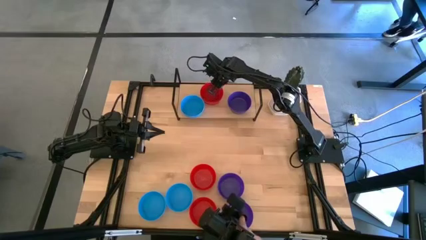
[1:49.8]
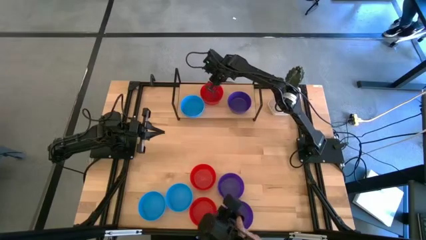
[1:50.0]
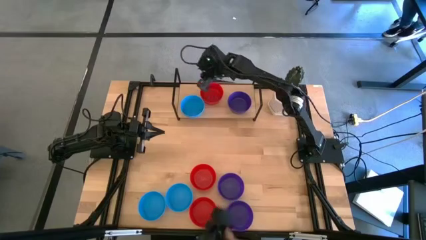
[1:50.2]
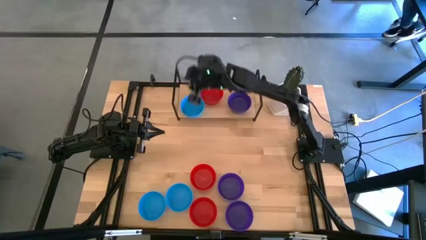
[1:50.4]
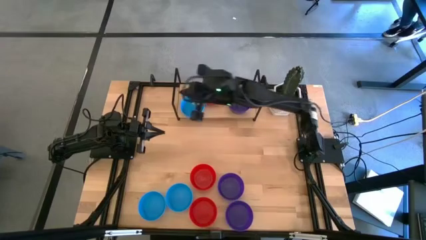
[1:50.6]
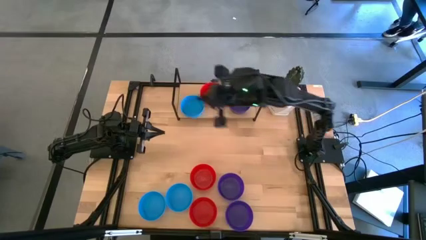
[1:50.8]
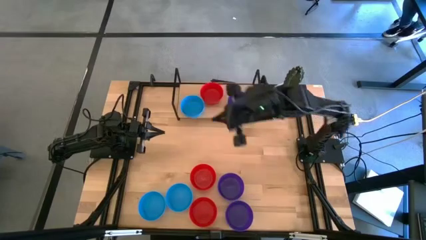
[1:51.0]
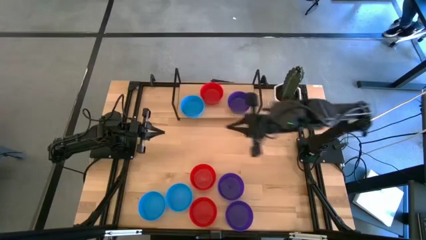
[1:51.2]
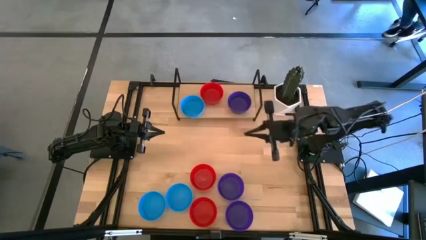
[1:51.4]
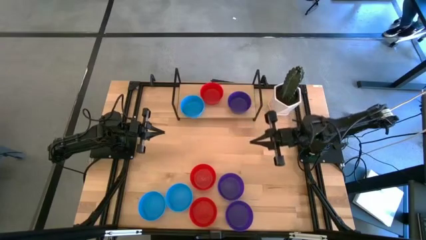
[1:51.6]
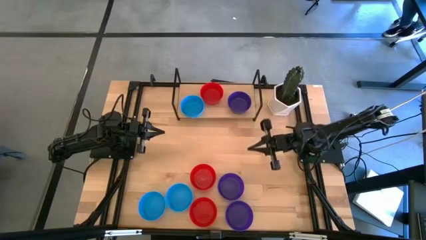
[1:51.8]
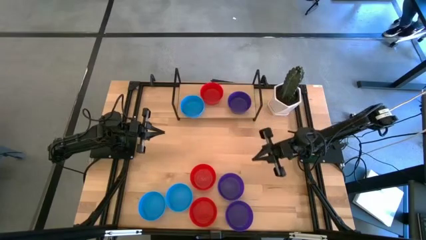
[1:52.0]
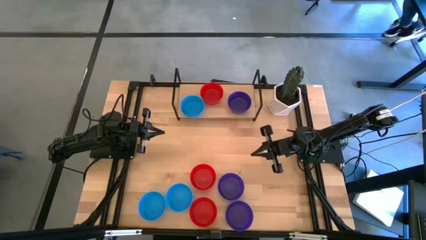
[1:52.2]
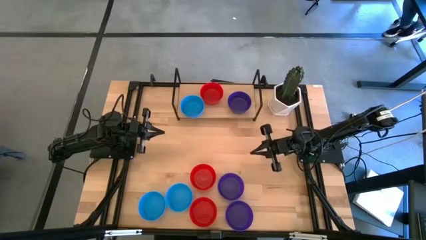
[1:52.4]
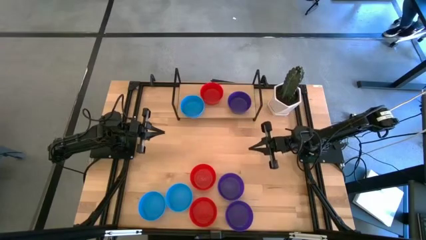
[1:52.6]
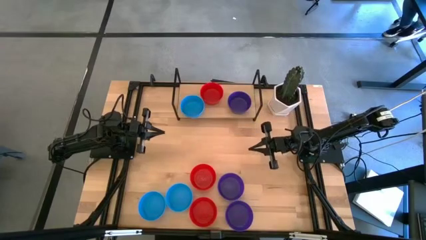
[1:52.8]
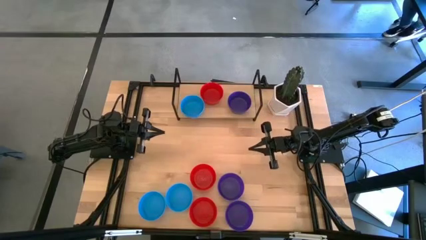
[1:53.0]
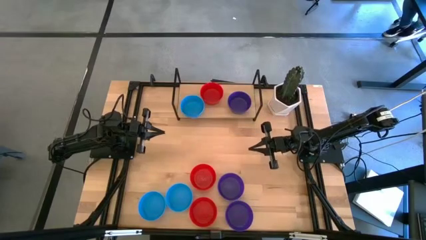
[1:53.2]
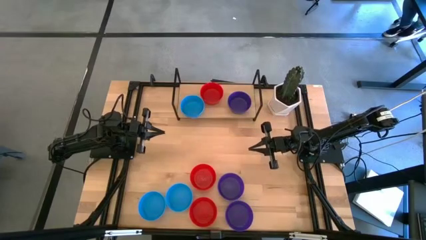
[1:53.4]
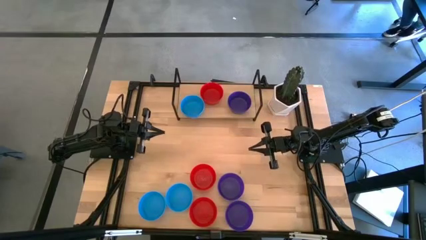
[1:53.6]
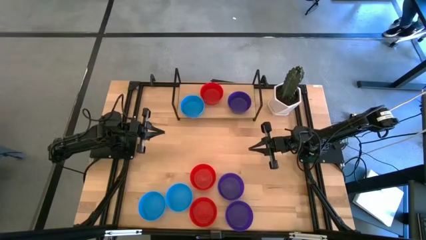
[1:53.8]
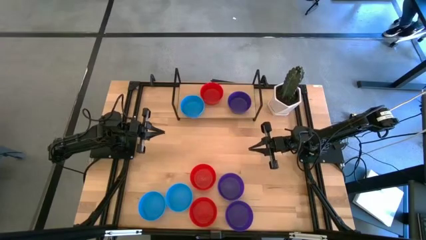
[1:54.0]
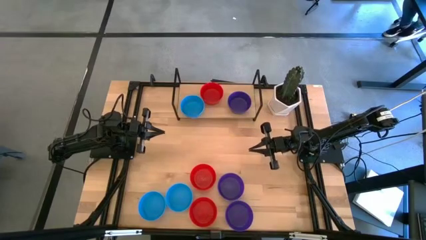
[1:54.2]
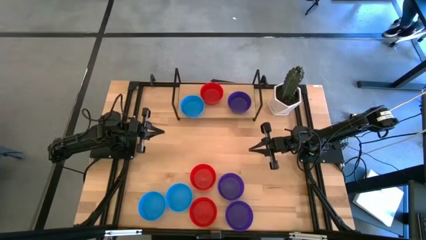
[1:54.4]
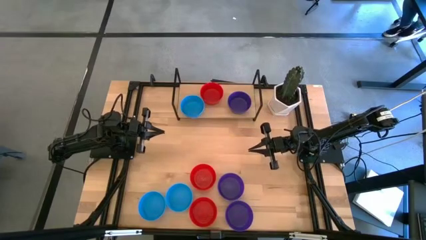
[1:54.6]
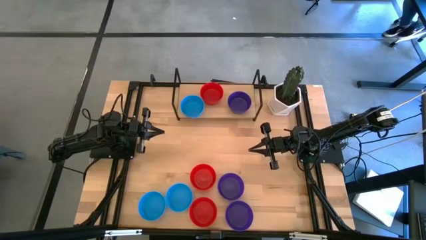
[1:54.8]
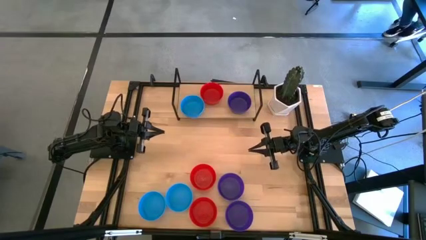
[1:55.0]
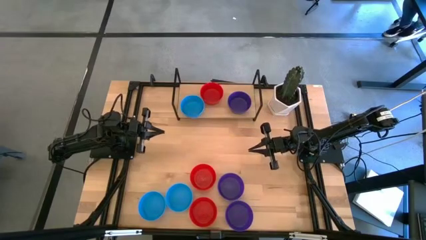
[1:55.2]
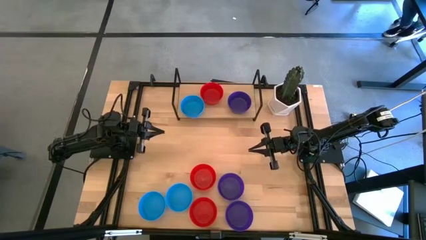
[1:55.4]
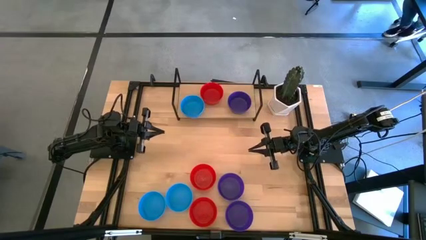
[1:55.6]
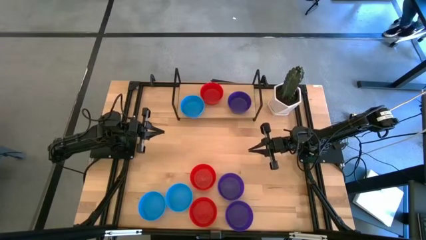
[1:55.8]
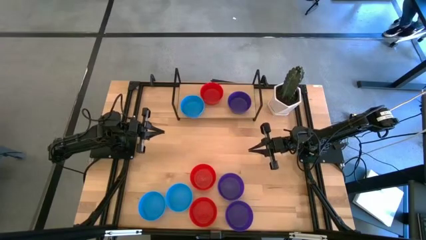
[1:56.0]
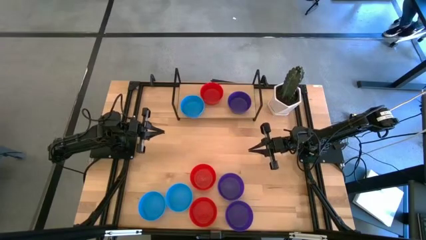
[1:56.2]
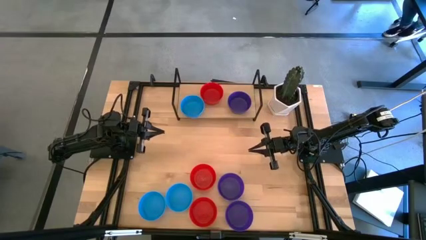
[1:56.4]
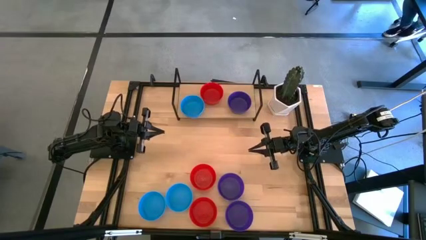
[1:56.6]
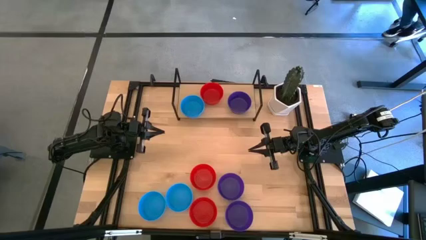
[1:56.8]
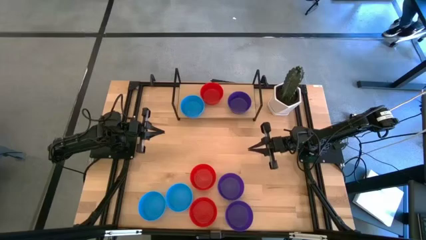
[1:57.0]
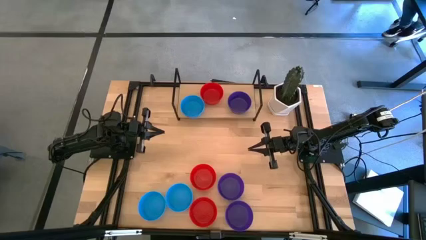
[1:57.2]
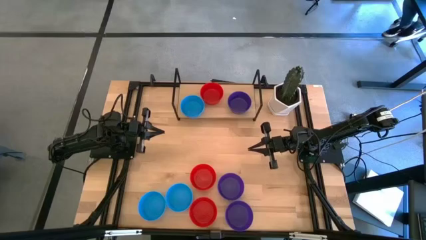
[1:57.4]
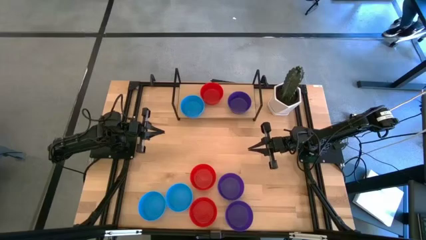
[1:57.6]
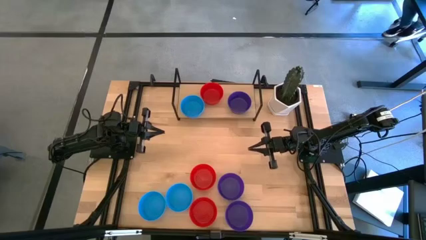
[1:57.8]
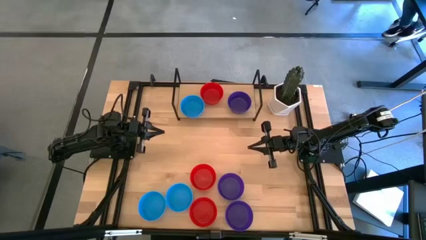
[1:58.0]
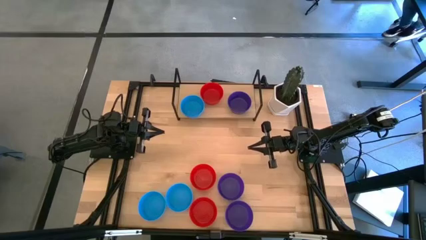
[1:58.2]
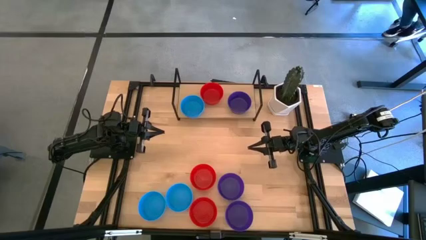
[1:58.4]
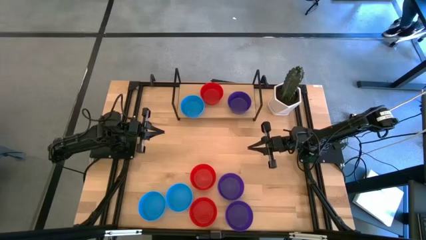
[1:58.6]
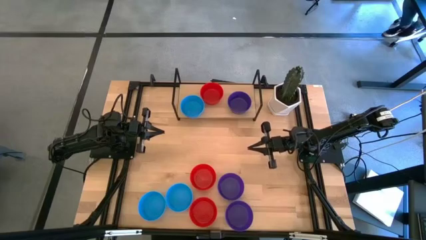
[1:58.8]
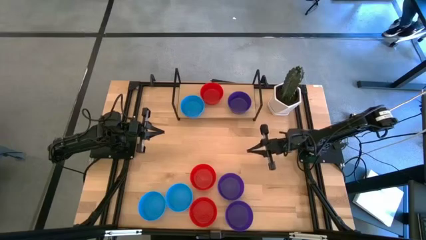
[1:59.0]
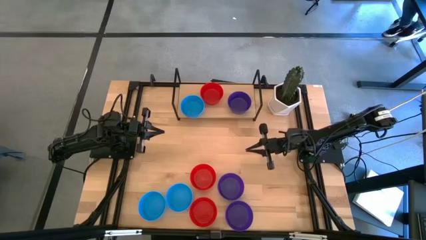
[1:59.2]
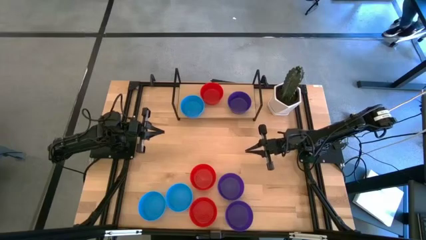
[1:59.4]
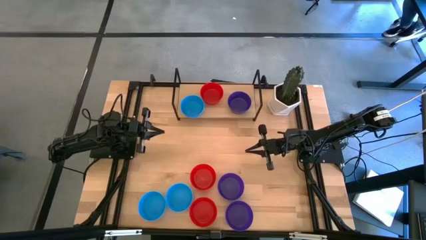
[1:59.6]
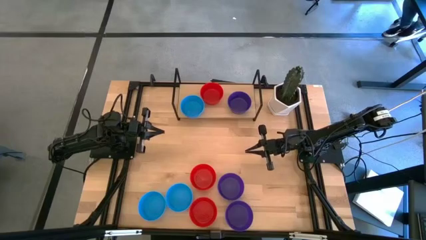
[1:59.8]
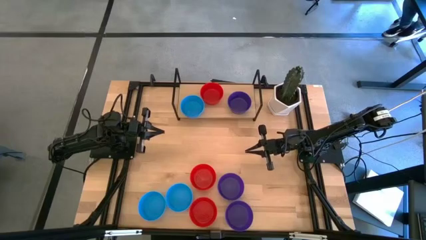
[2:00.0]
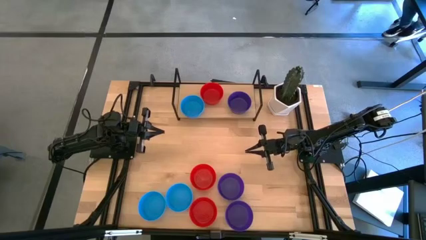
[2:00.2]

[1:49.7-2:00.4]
Task: Pick & Place Mini bowls
Stack the purple bowl on top of the purple bowl on the shelf

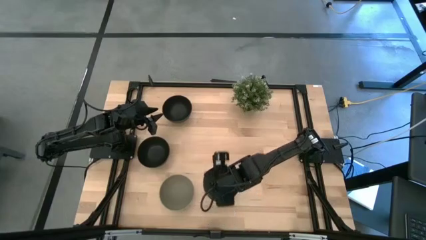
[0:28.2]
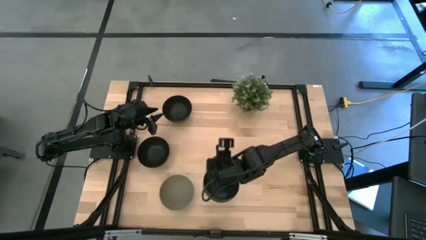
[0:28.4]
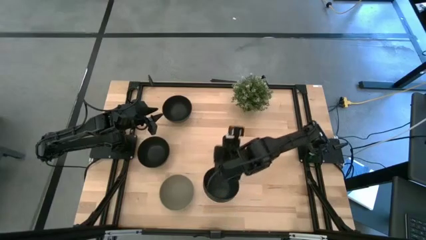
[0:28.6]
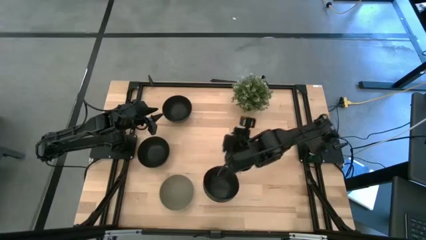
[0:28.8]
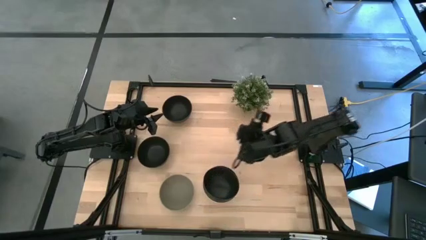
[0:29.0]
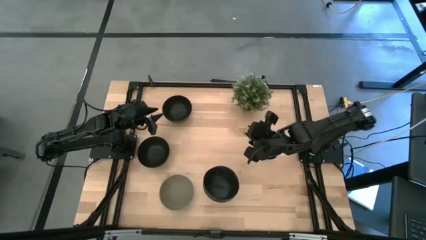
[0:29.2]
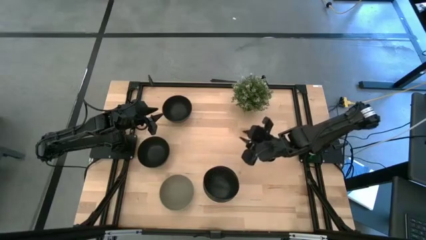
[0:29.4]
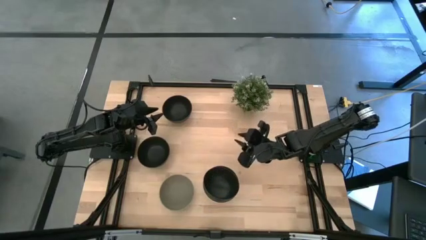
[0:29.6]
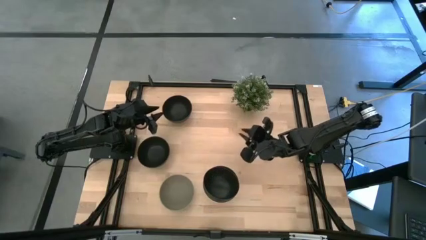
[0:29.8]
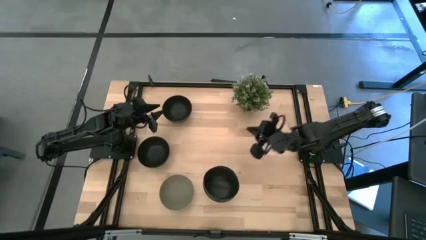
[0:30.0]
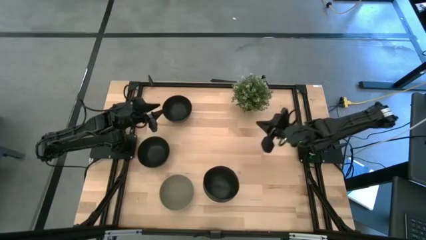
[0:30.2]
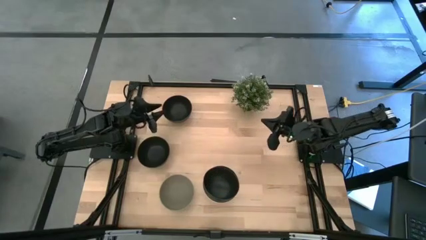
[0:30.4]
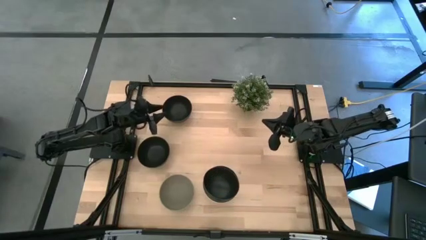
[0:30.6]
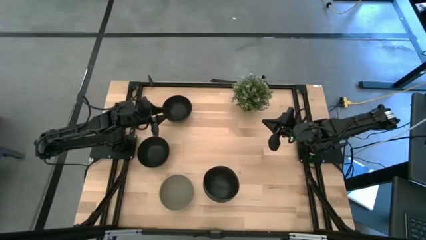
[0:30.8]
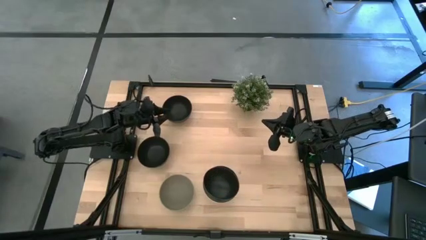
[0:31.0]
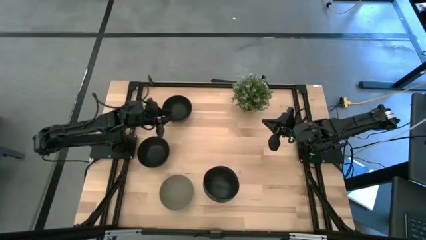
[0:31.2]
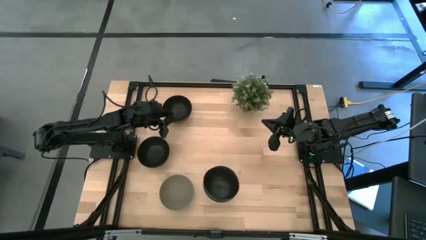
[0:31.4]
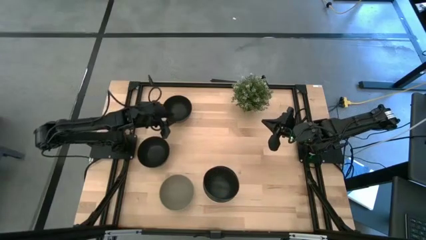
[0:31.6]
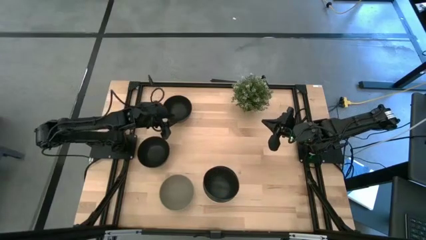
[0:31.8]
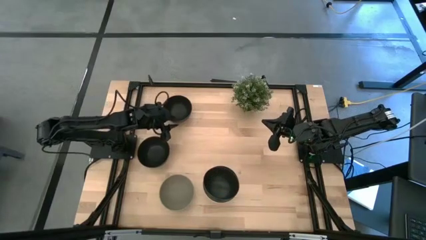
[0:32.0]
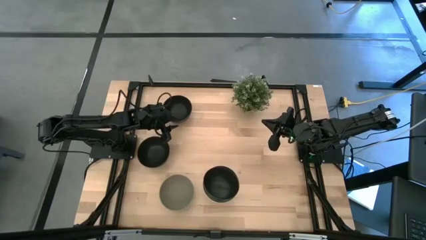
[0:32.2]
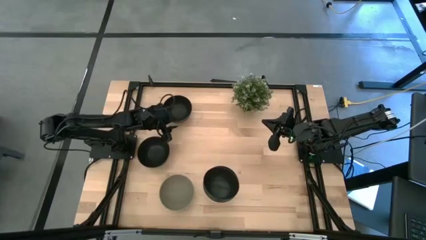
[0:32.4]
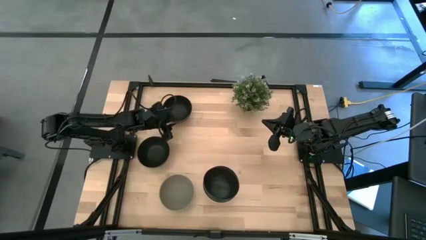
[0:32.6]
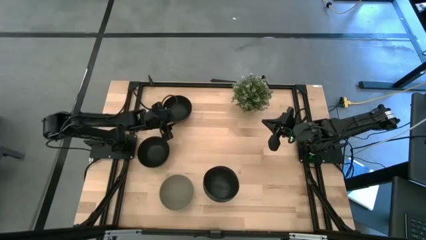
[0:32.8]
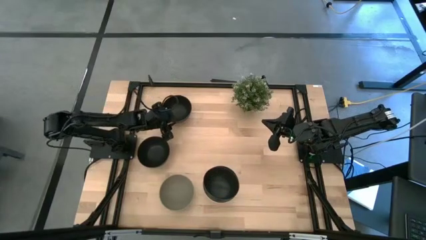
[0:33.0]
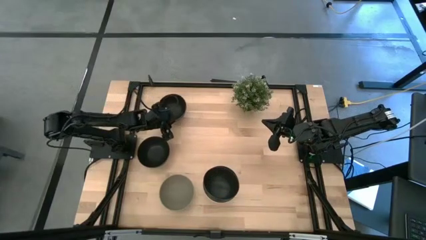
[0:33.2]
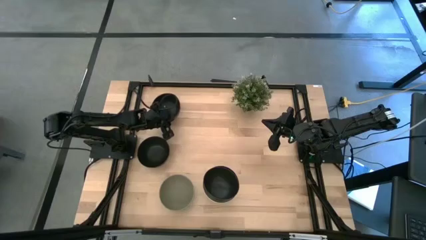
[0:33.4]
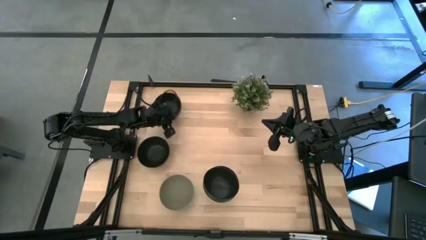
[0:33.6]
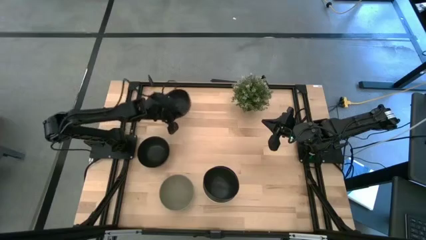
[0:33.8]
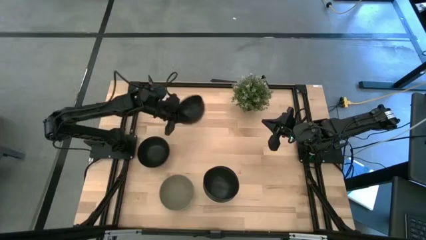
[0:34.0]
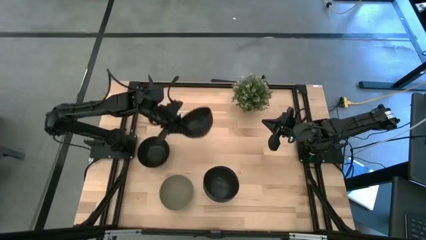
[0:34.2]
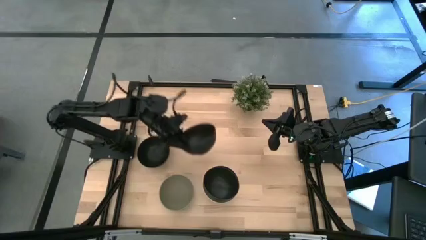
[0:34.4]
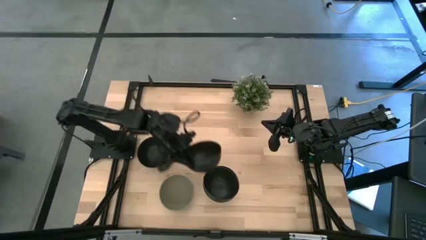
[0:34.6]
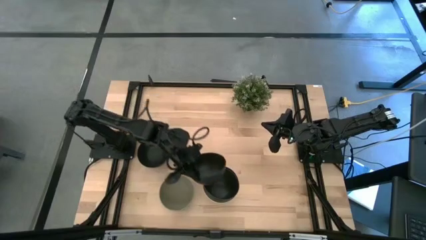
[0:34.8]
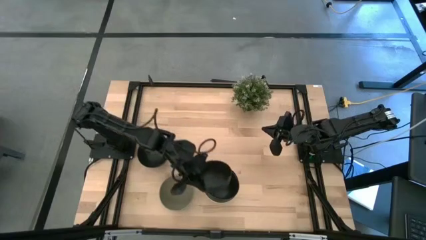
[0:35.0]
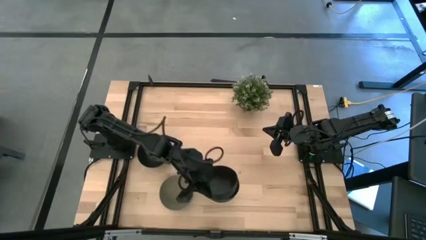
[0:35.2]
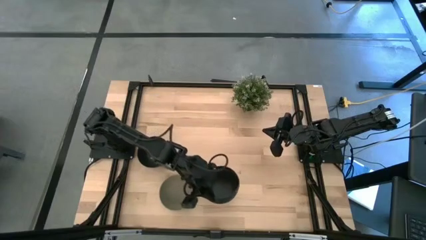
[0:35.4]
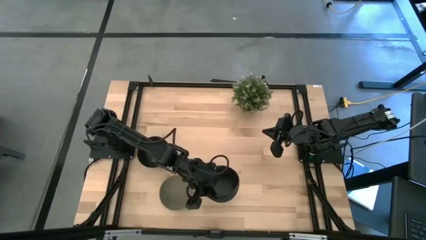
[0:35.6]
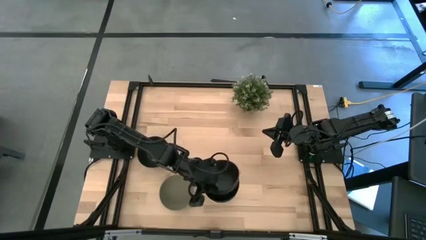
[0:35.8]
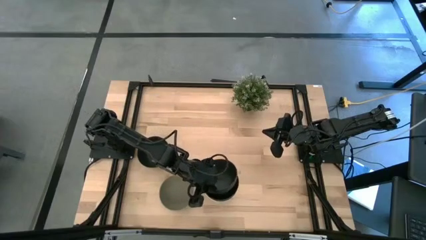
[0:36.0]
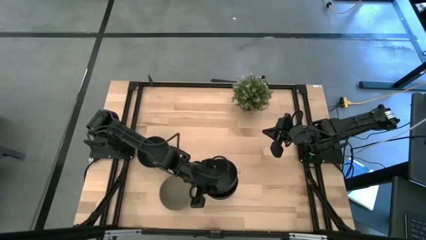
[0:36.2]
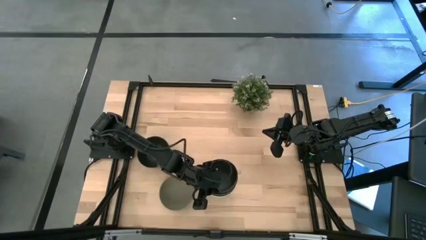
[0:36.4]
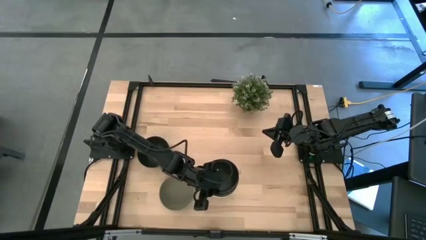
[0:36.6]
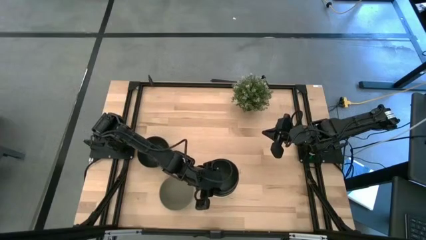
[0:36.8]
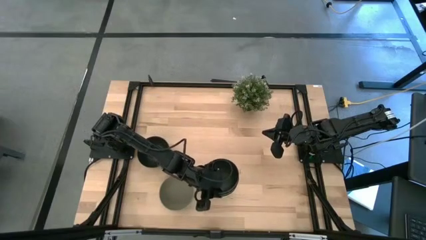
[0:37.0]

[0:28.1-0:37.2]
Task: Nest bowls inside each other
Stack the black bowl on top of the black bowl
